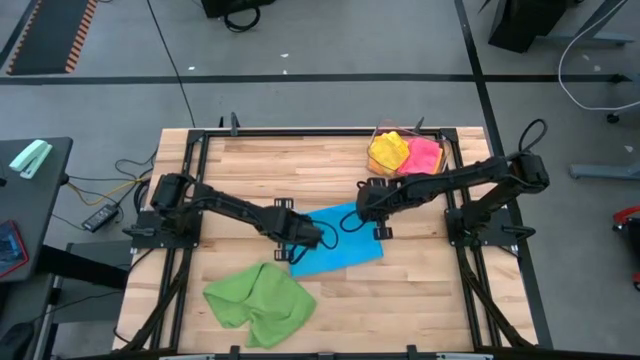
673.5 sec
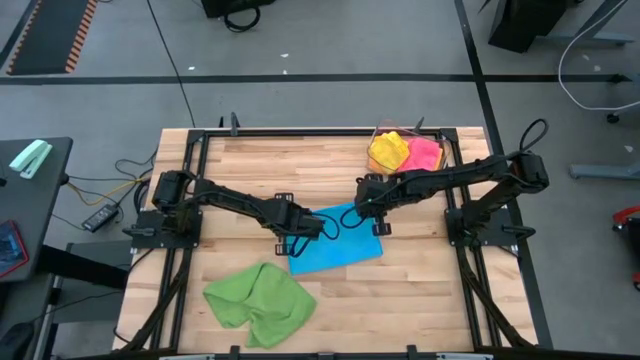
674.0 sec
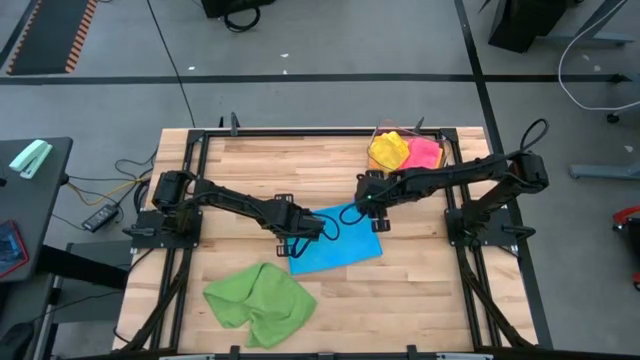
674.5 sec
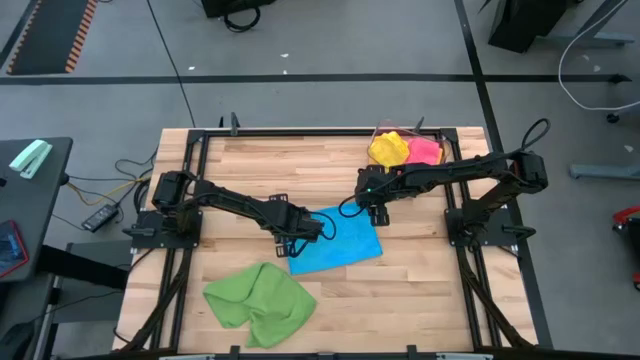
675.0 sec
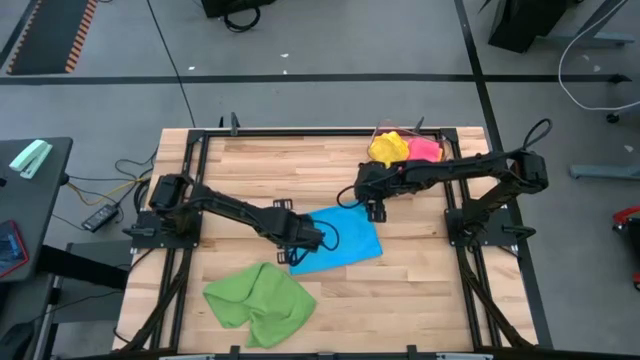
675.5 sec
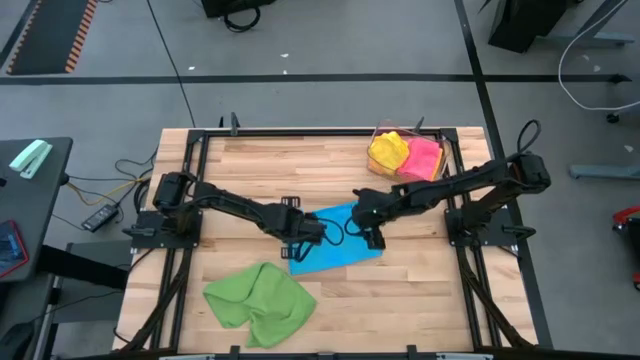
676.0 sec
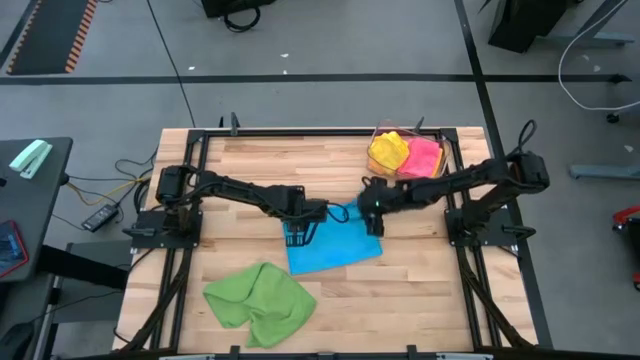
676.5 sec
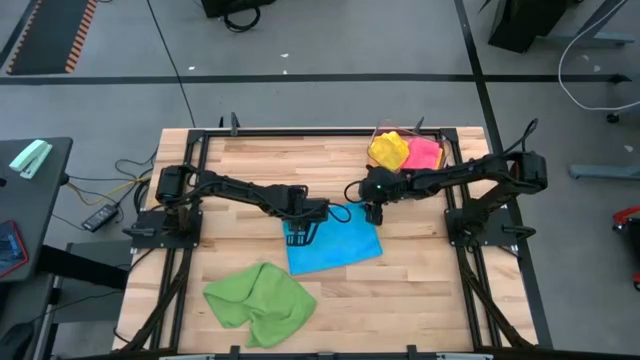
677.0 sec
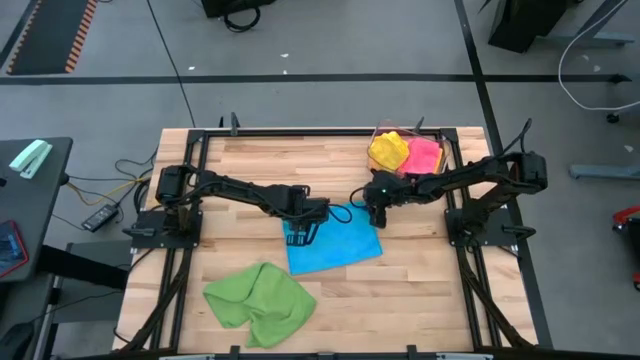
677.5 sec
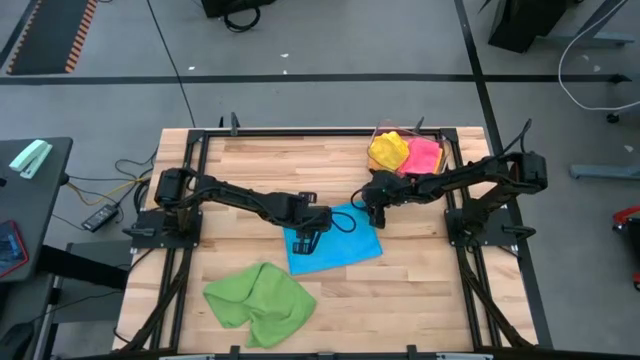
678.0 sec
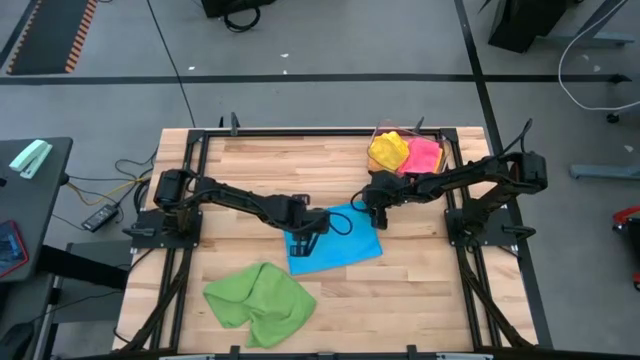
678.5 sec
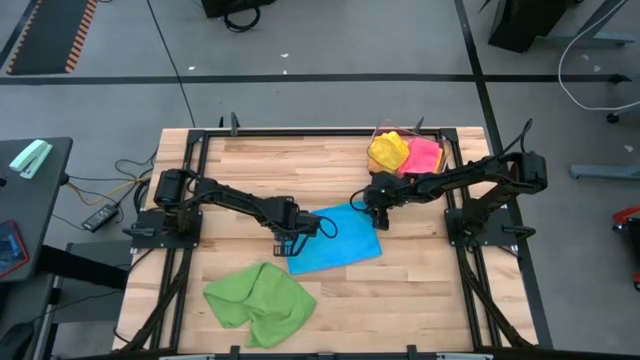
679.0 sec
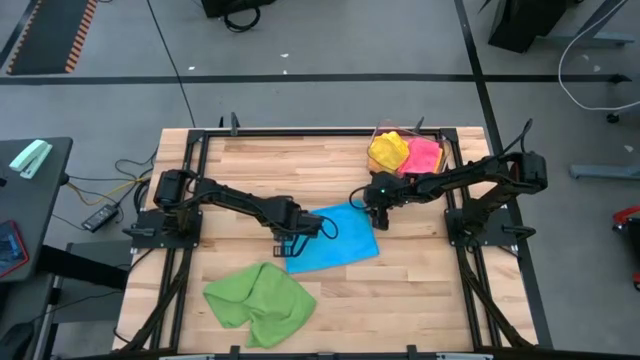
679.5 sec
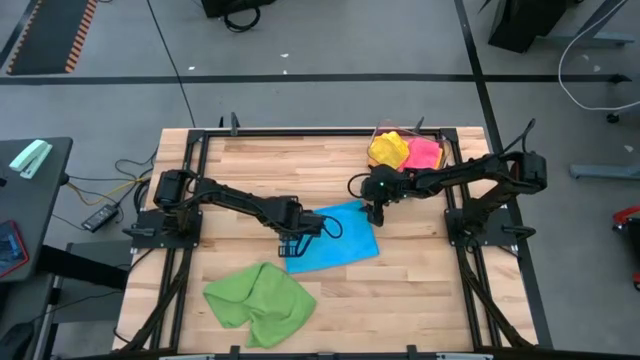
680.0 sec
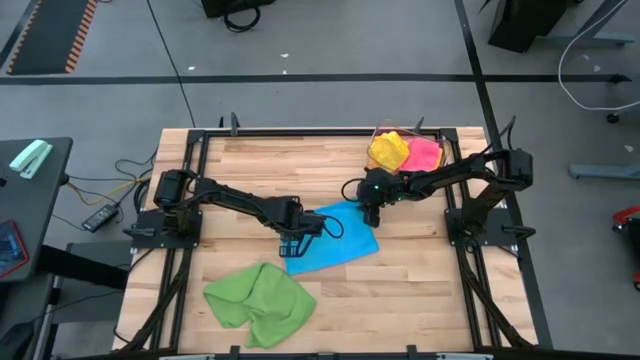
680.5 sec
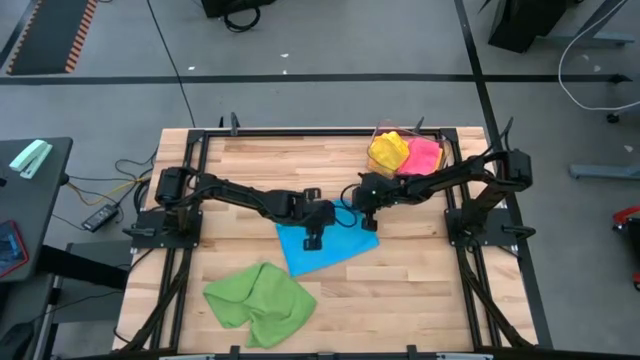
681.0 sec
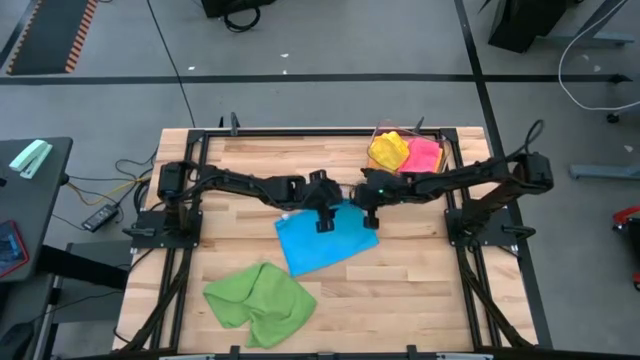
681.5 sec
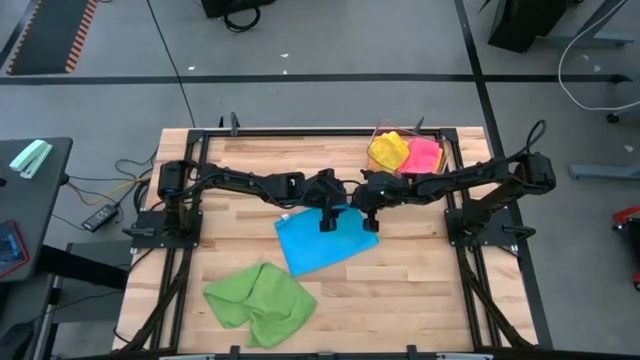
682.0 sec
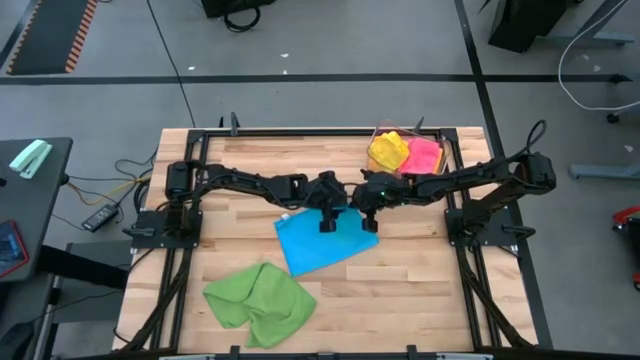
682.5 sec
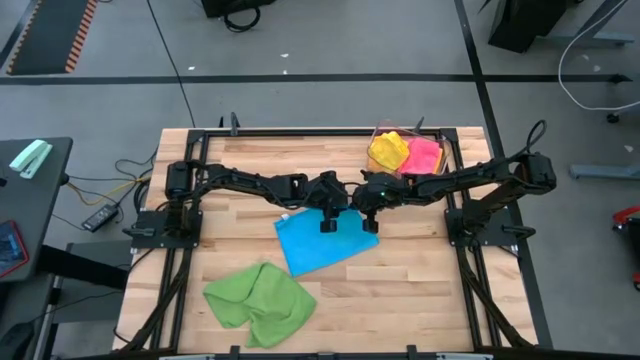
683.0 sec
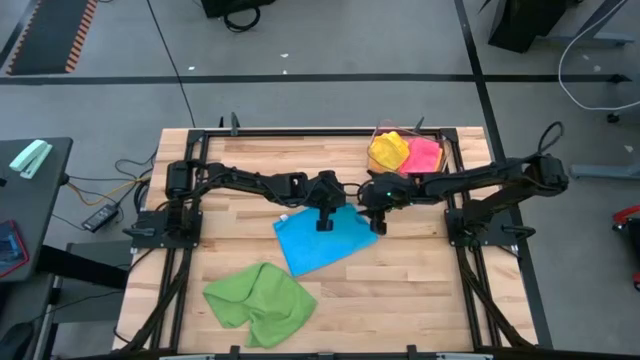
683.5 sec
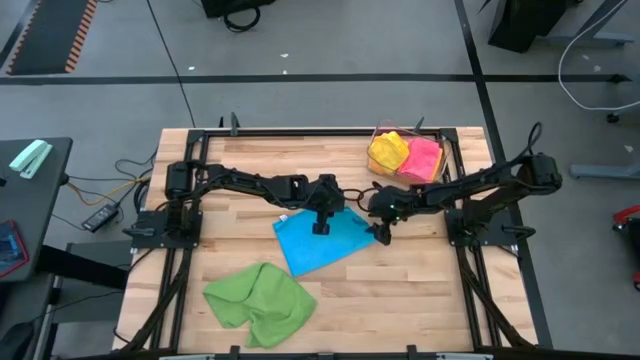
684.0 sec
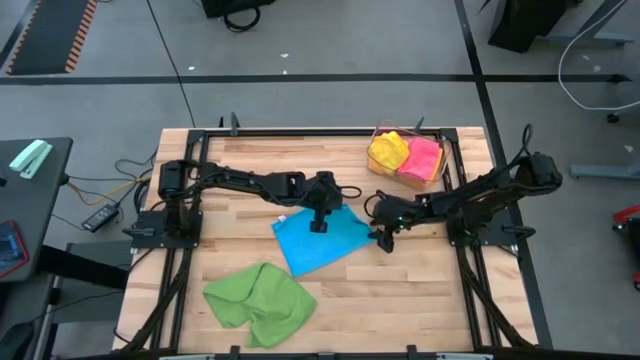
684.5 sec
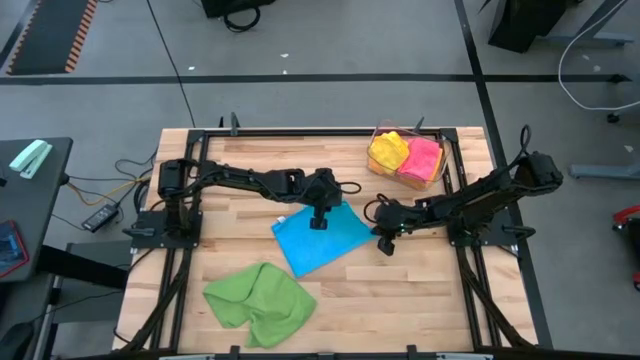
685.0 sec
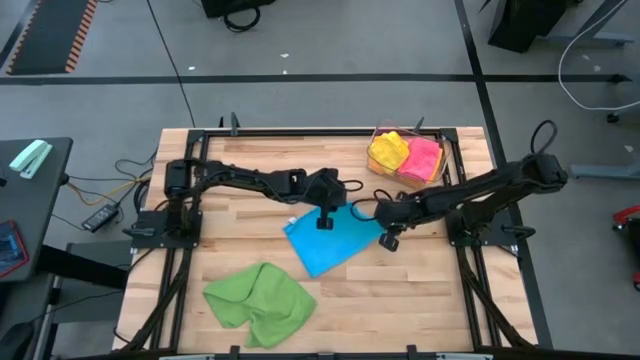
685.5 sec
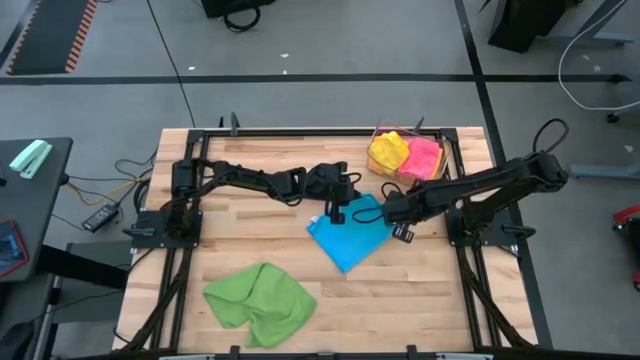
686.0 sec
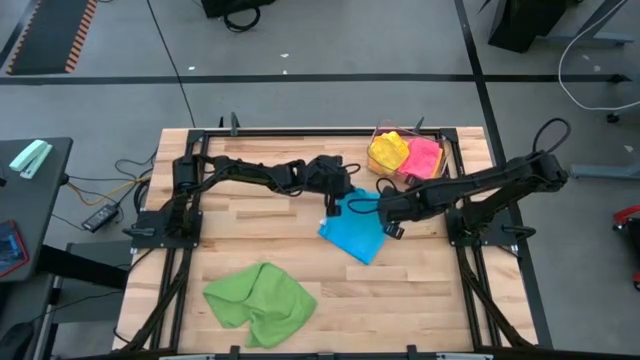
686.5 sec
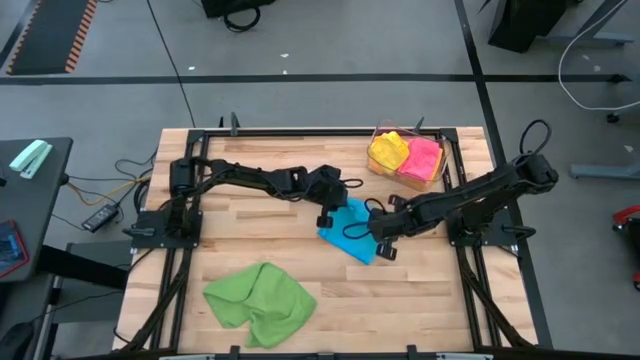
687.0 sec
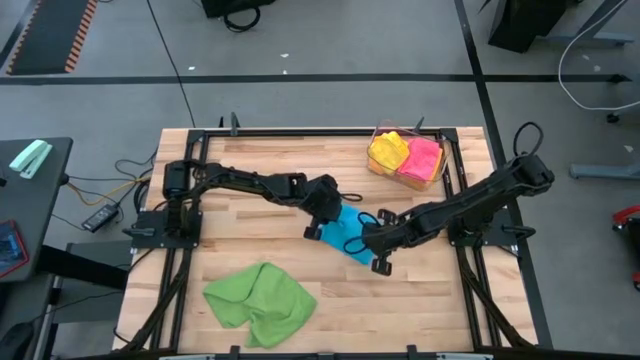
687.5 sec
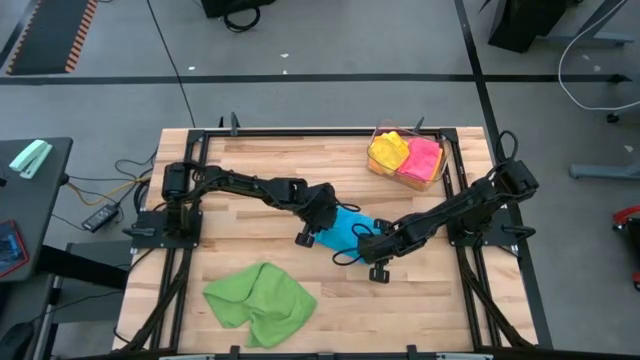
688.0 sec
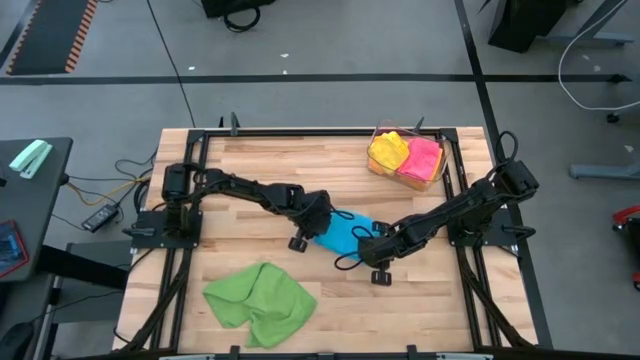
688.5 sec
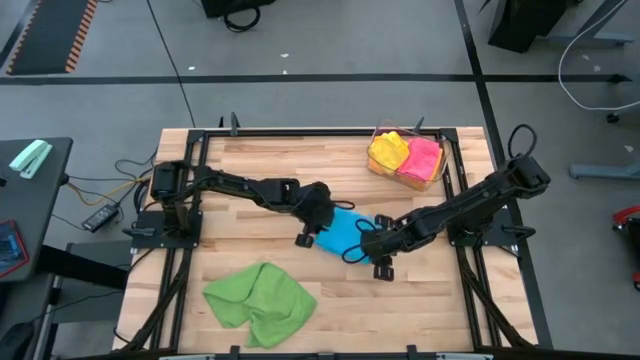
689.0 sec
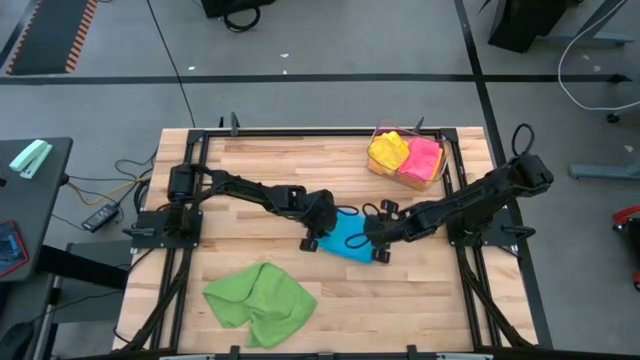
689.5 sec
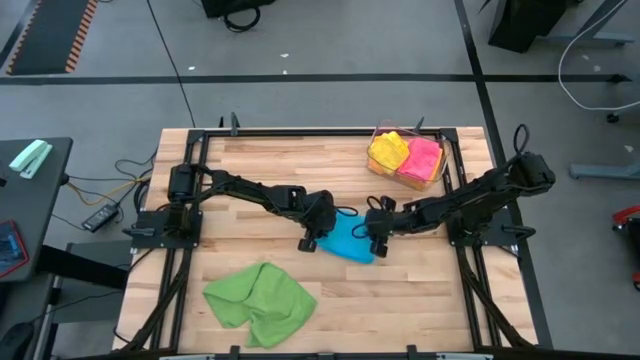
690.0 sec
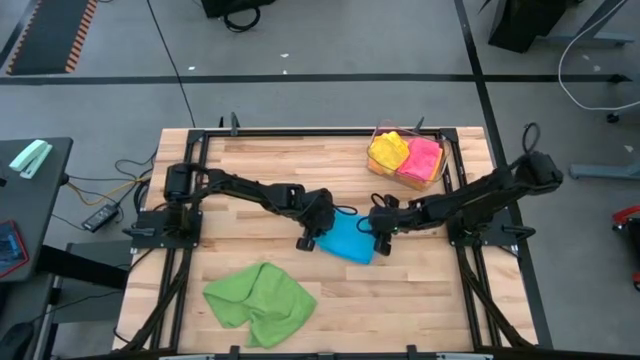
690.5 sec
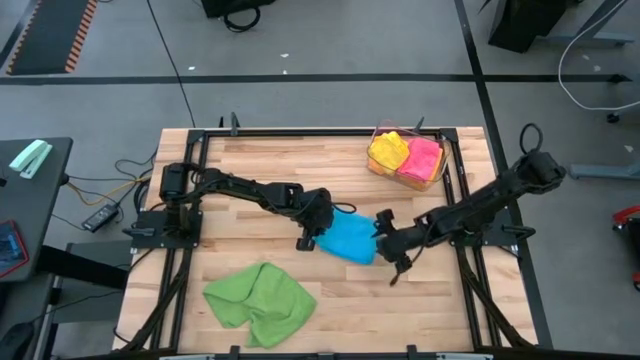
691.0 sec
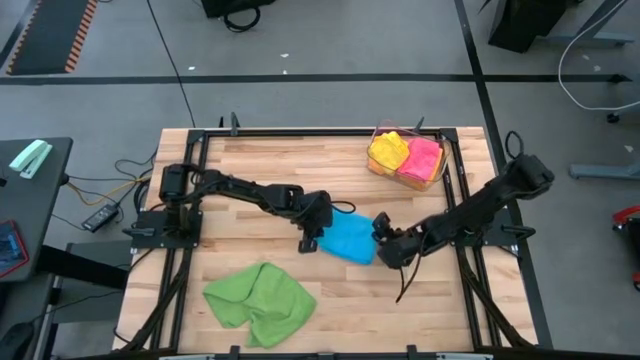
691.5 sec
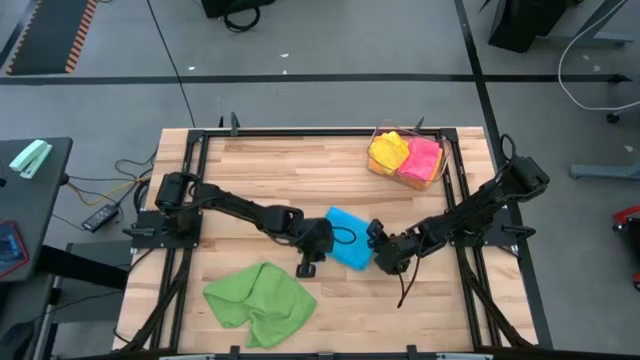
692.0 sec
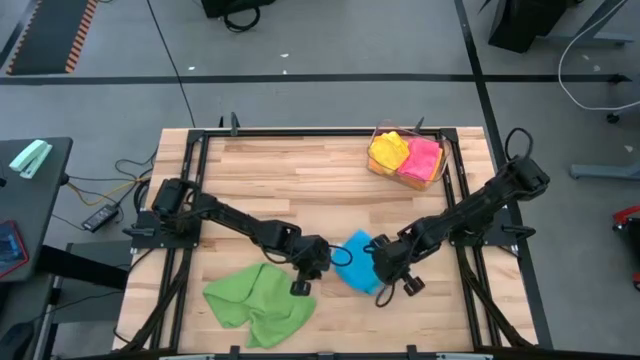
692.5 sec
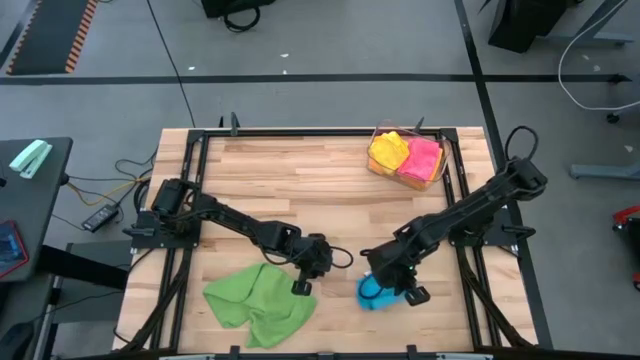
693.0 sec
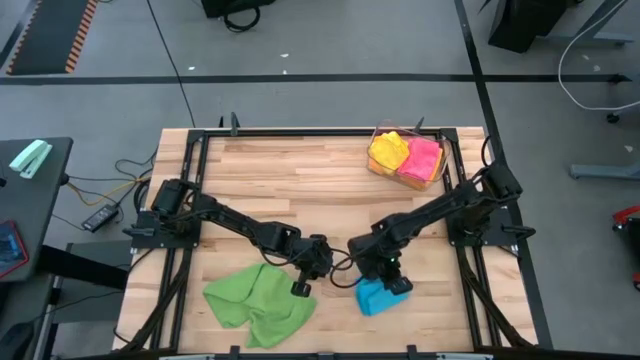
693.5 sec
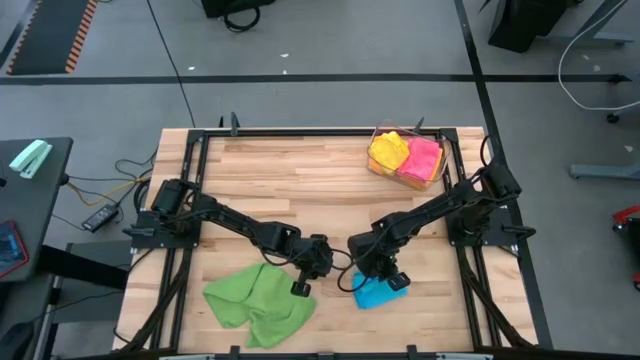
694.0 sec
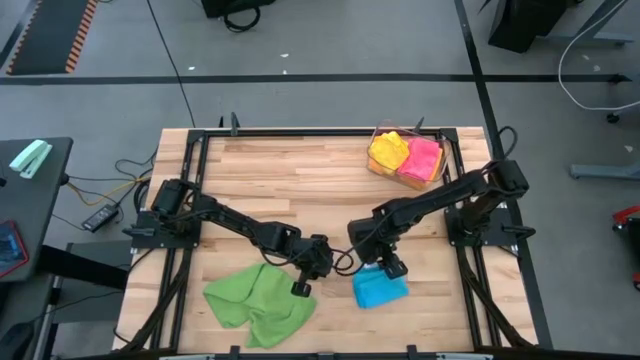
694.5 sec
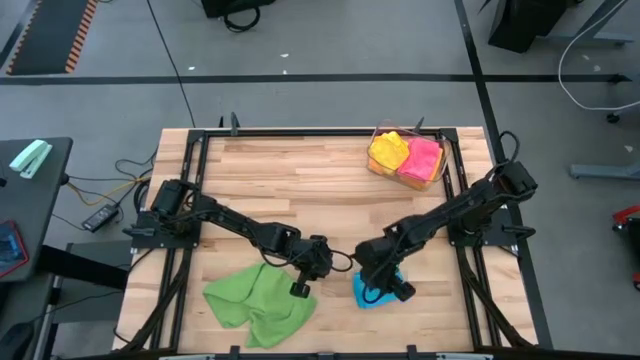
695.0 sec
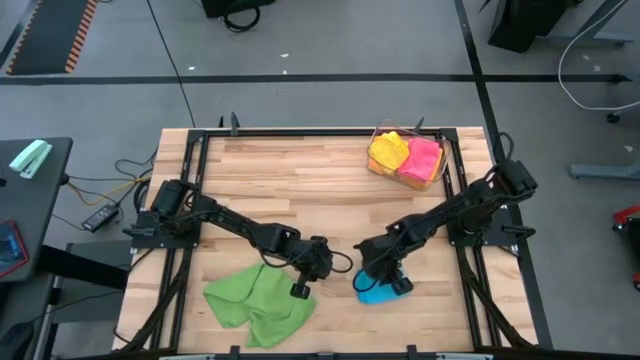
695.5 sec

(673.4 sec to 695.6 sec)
Task: Fold microfiber towels
Fold the blue microfiber cloth
